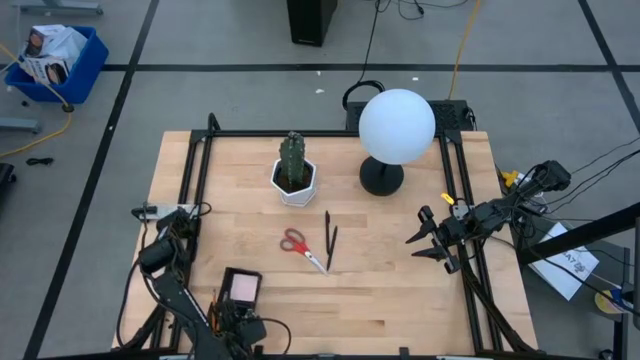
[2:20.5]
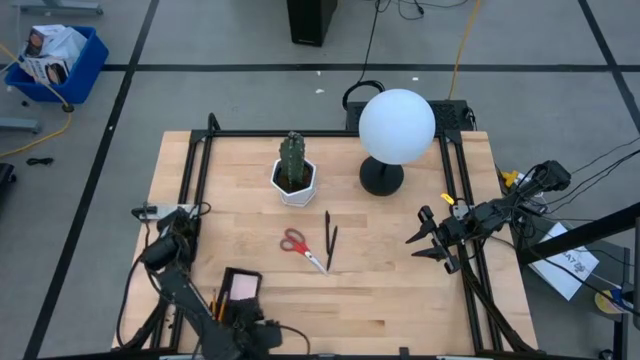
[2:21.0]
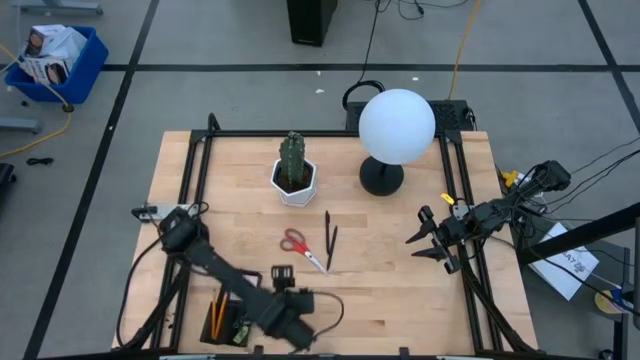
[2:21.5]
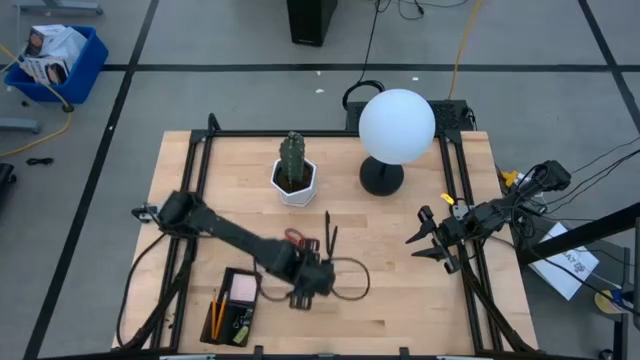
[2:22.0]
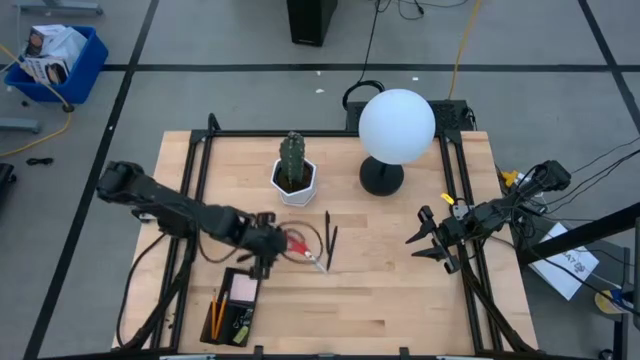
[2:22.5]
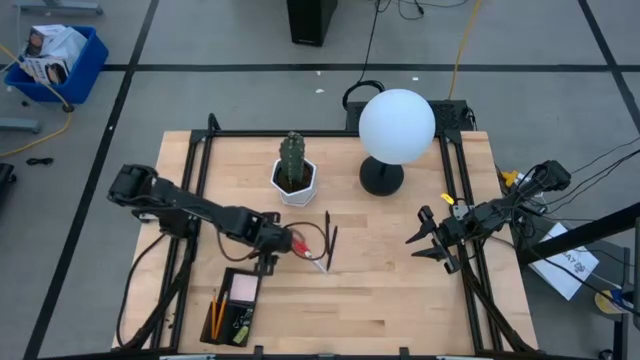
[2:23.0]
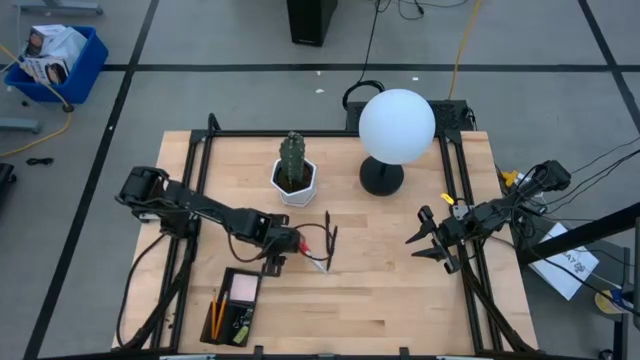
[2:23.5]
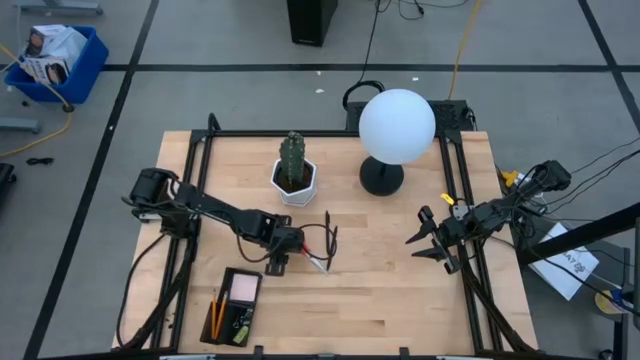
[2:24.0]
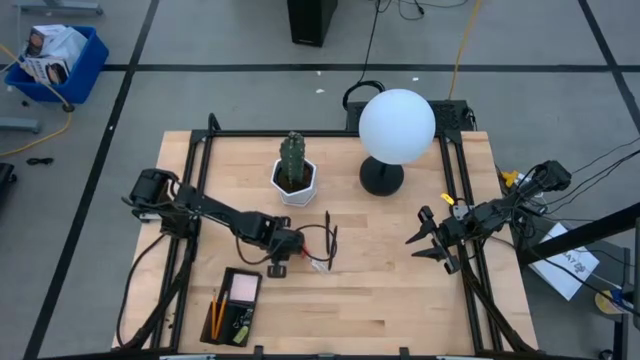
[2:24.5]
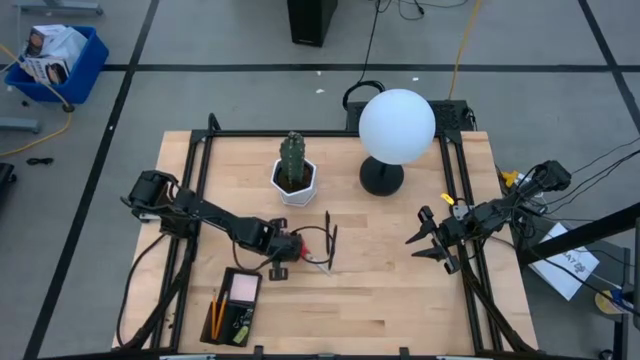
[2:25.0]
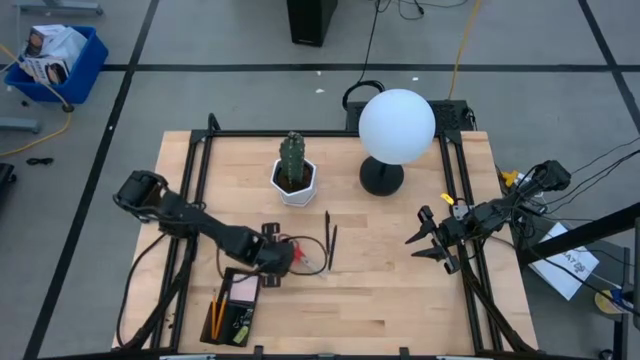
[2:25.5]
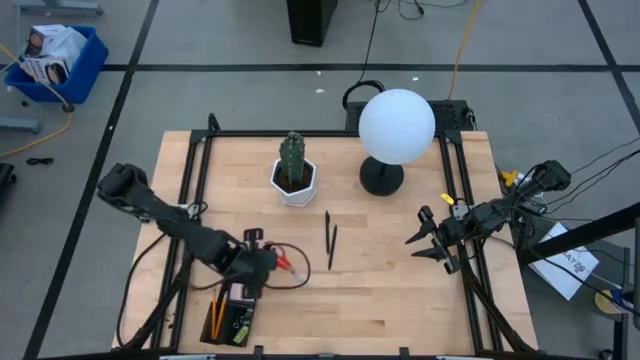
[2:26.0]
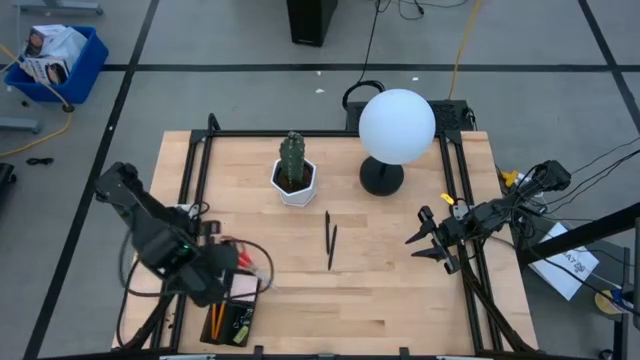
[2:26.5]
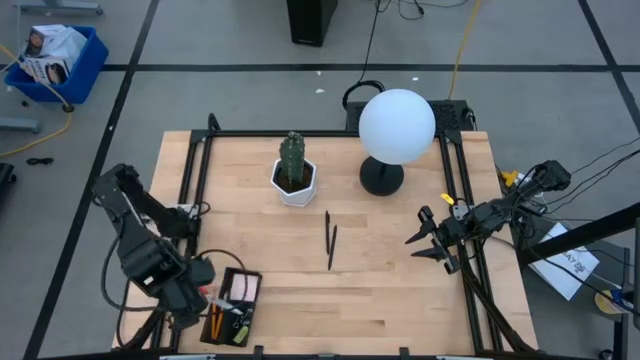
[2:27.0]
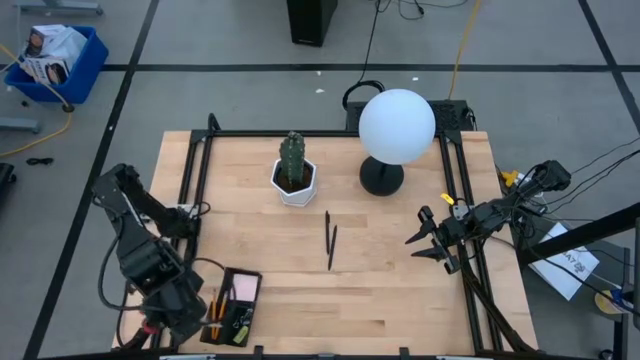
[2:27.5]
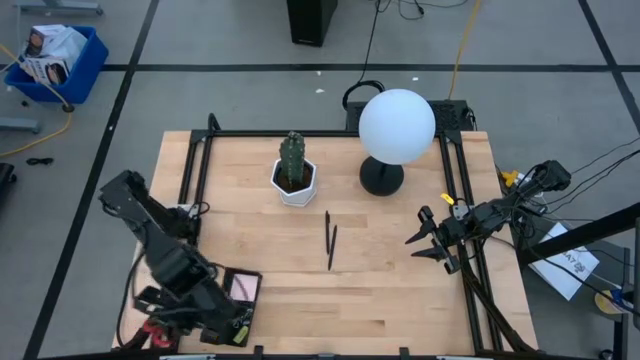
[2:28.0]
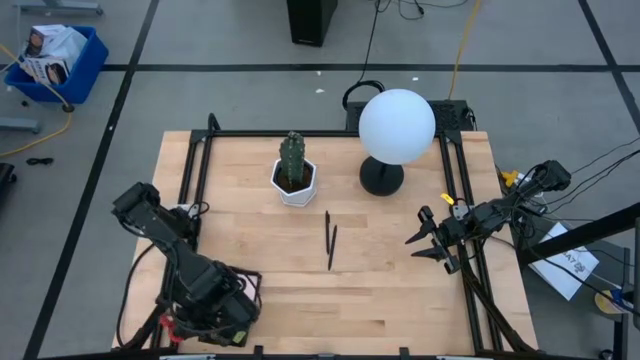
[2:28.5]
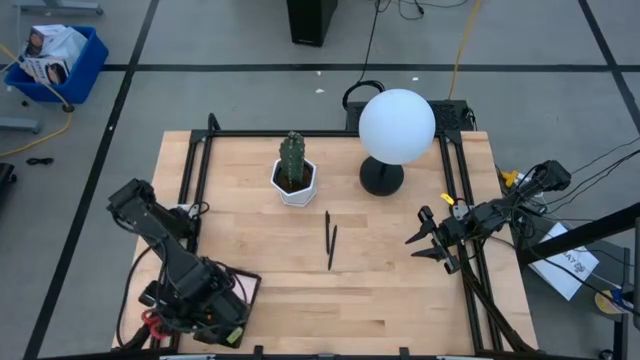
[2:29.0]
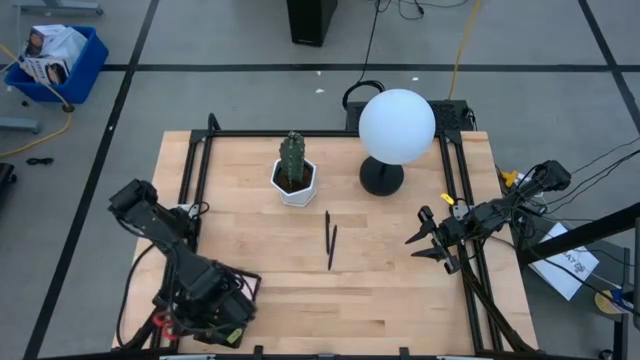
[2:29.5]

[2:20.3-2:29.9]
Task: Pick and place office supplies into organizer
Put the scissor in the desk organizer

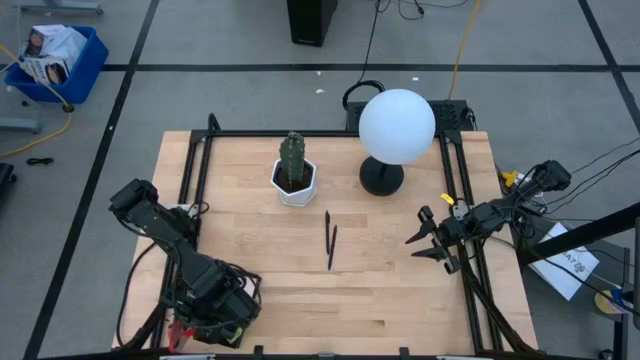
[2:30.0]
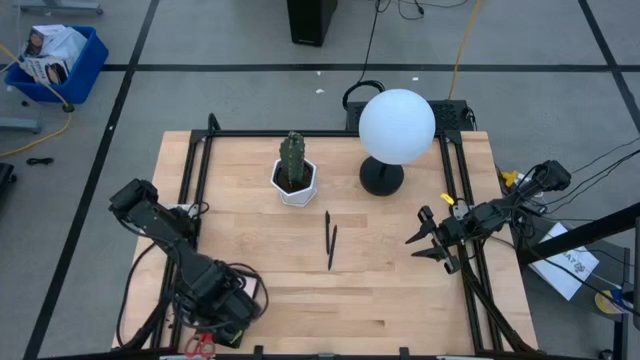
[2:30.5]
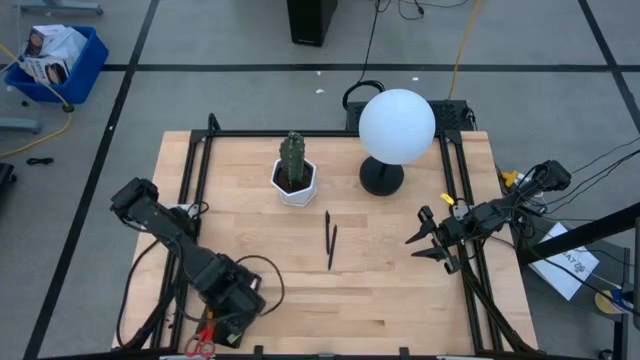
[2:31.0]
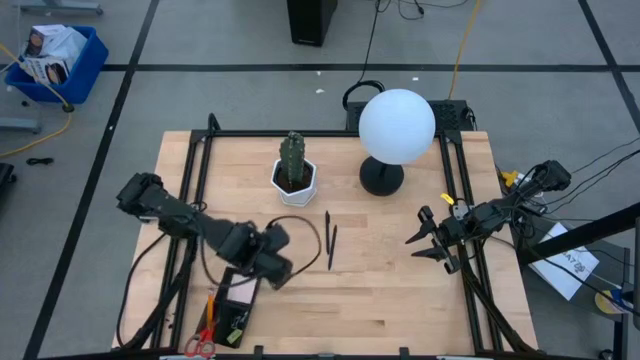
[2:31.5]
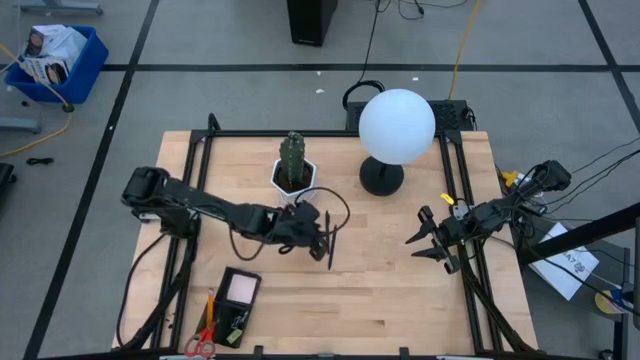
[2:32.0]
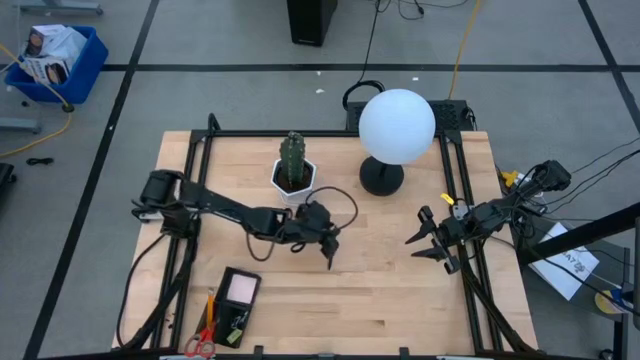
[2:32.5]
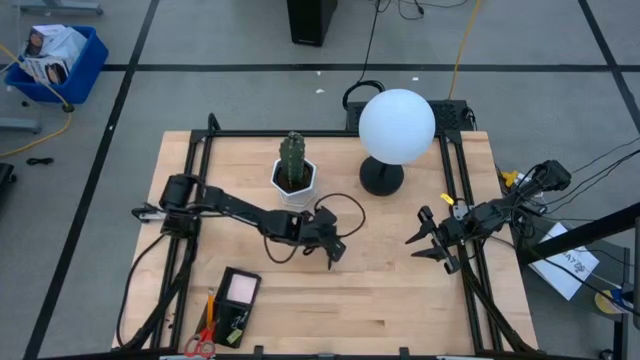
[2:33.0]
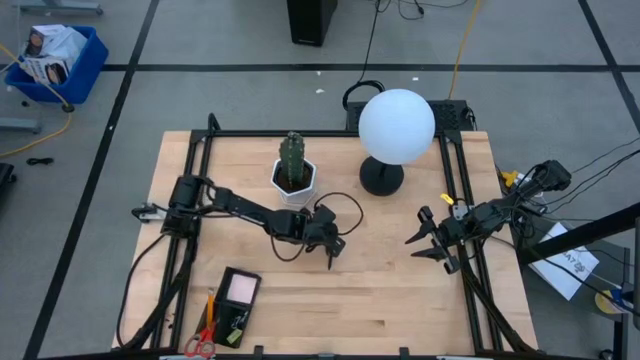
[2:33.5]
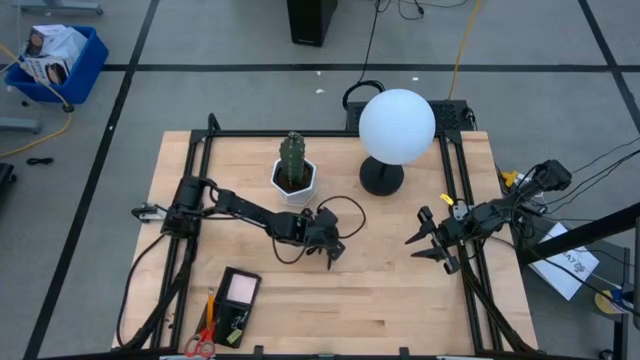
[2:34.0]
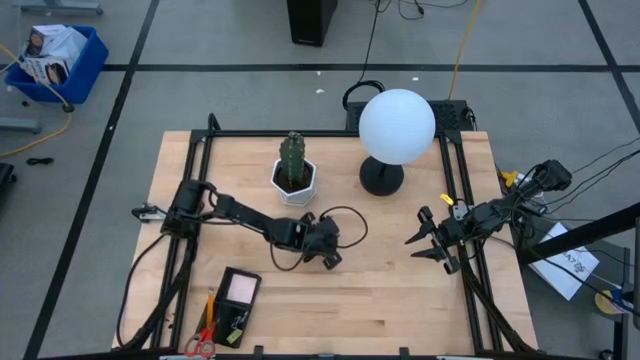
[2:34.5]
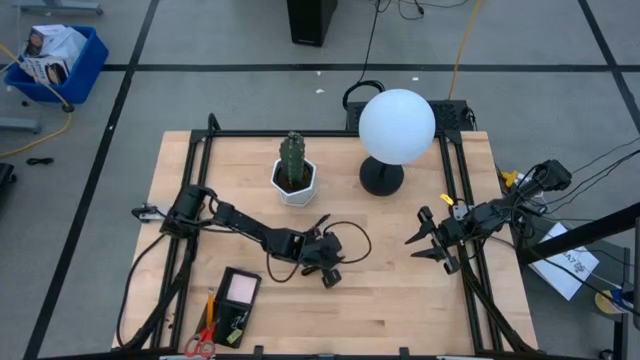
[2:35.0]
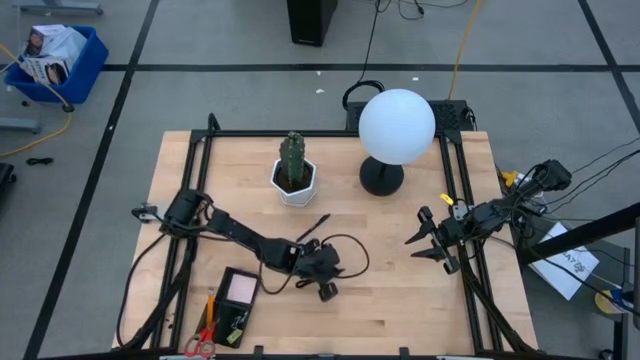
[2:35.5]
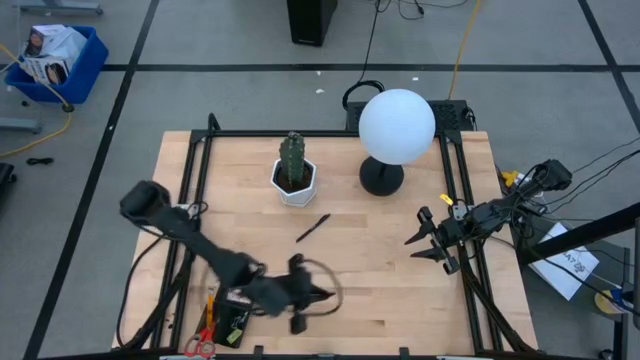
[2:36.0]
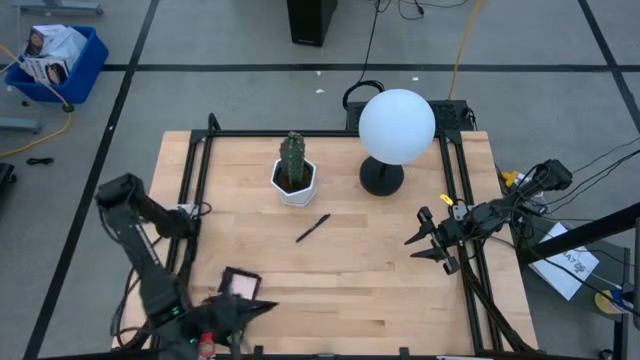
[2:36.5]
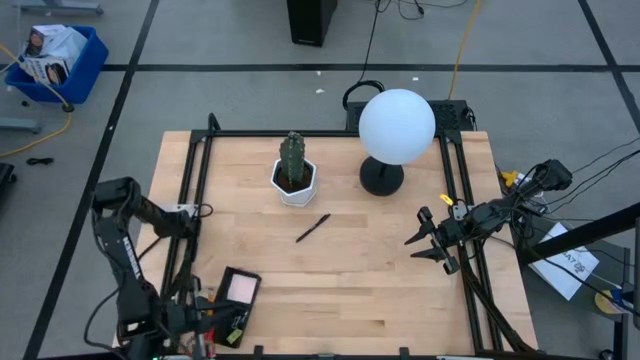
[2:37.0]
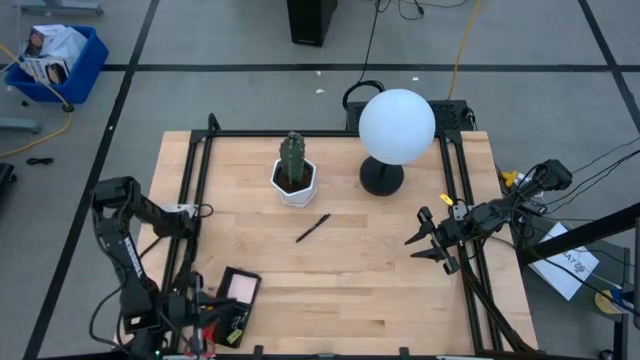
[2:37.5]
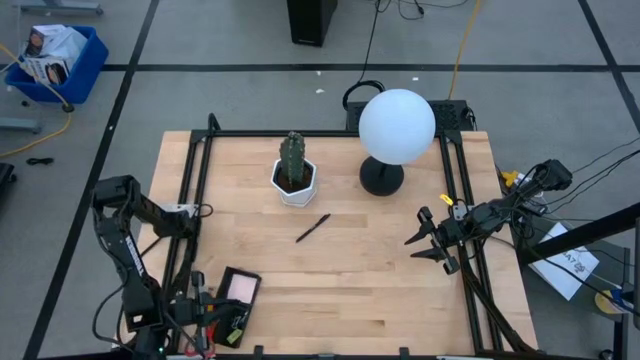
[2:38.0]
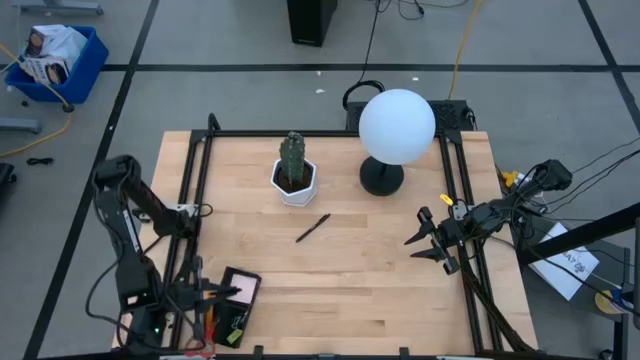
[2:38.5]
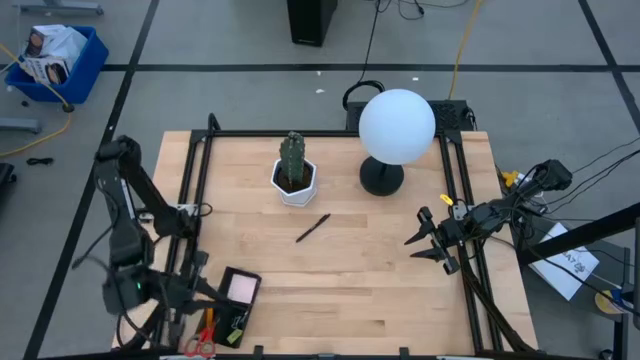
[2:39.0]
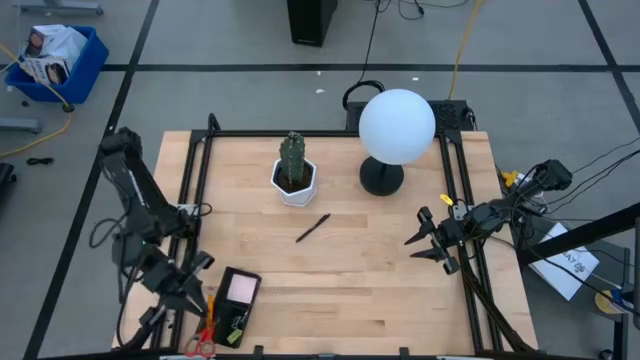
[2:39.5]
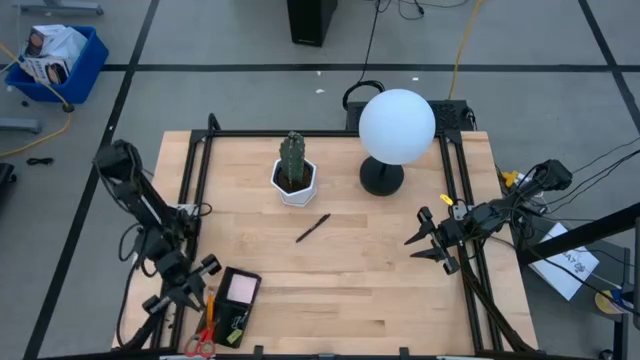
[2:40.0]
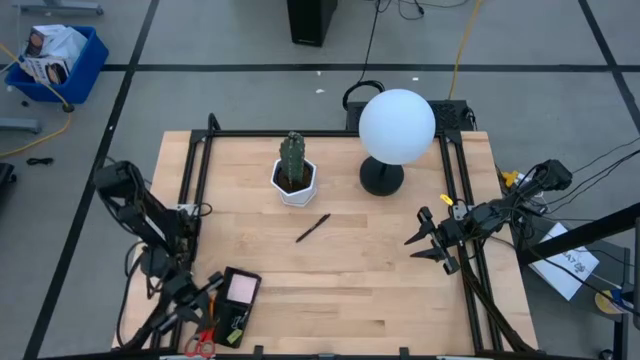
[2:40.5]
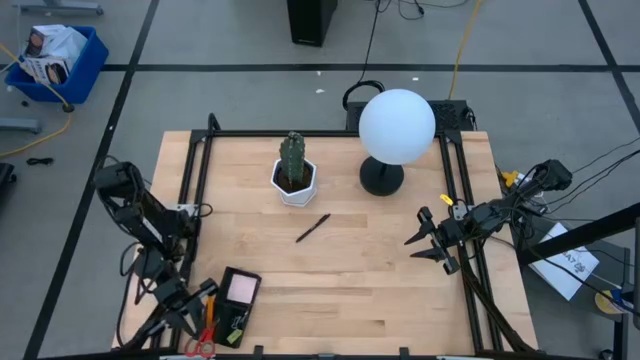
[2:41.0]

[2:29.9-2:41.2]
Put the right pen in the desk organizer

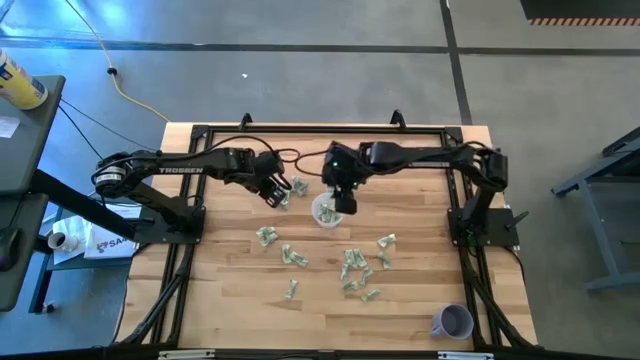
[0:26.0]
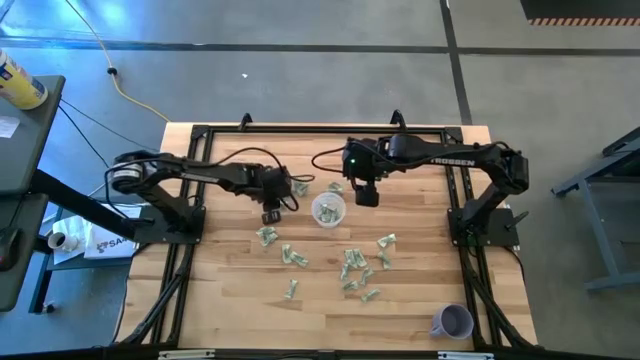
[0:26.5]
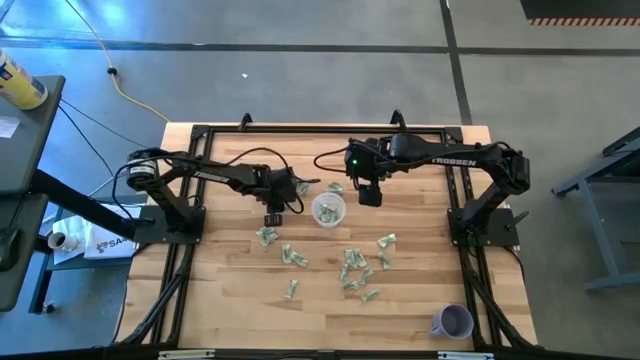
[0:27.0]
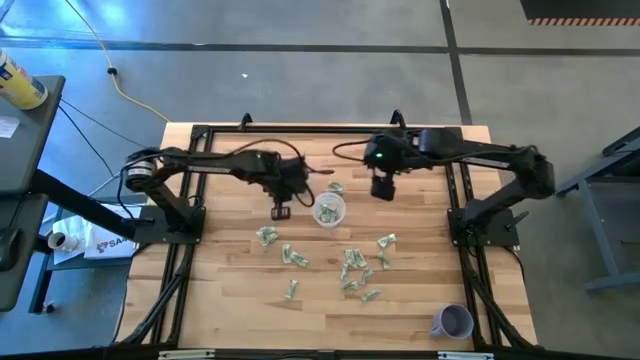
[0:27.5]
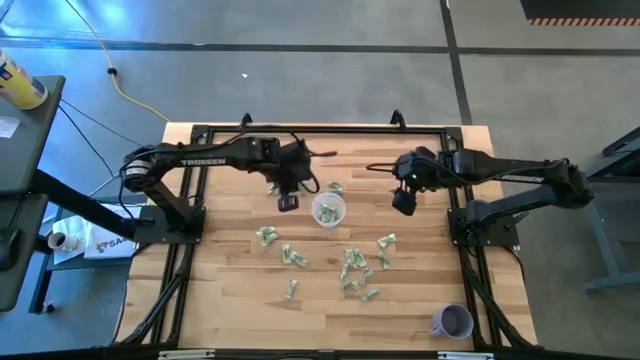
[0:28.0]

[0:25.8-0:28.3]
Task: Pick and place Stevia / Truvia into bins
Put the white stevia packet into the transparent container
